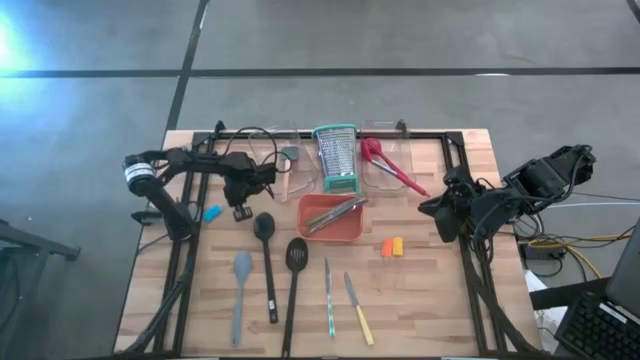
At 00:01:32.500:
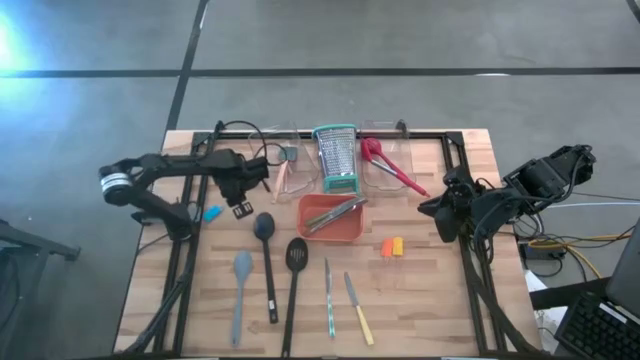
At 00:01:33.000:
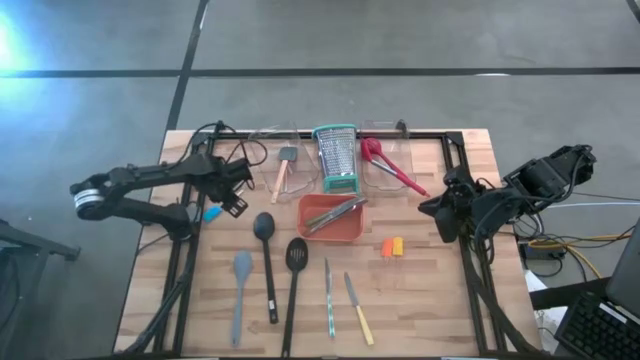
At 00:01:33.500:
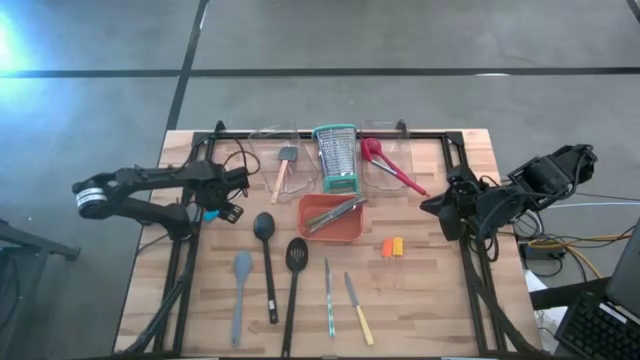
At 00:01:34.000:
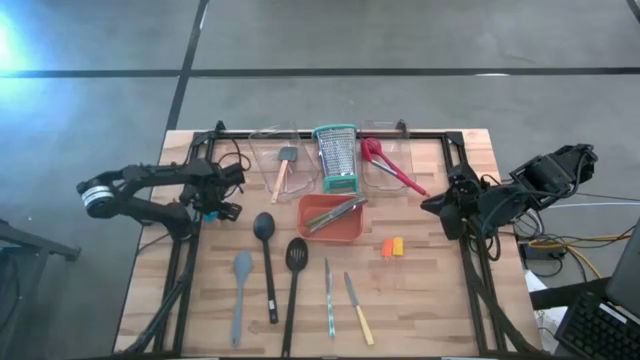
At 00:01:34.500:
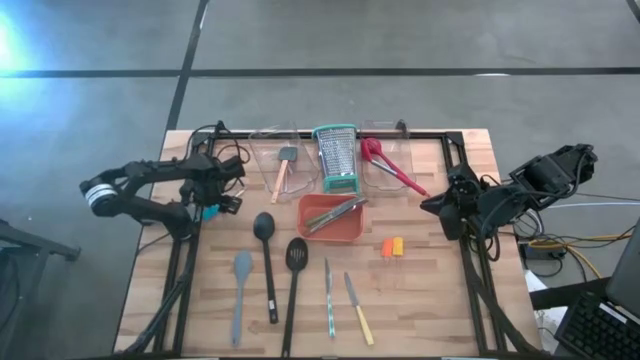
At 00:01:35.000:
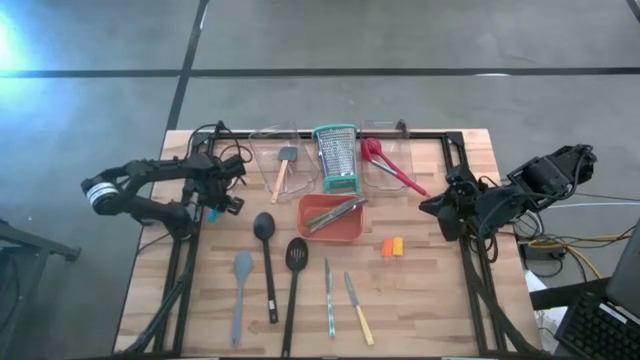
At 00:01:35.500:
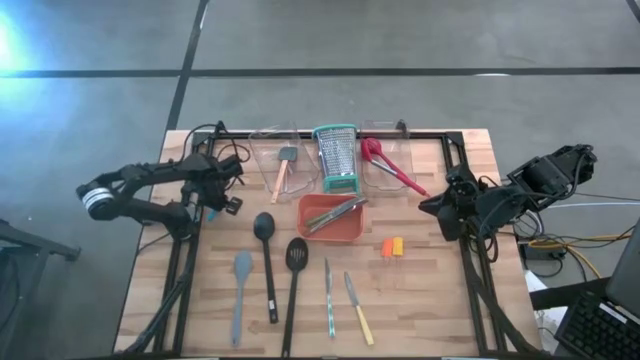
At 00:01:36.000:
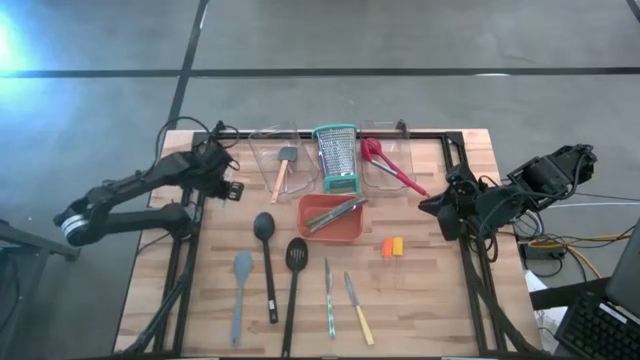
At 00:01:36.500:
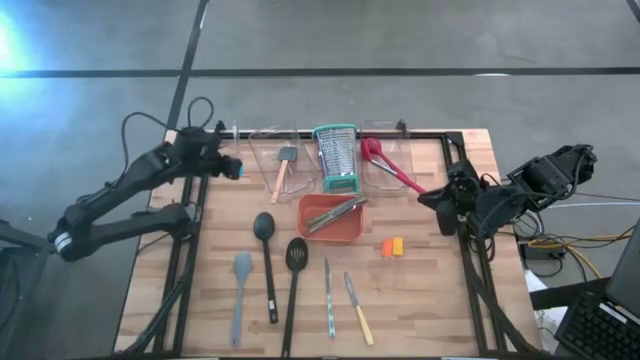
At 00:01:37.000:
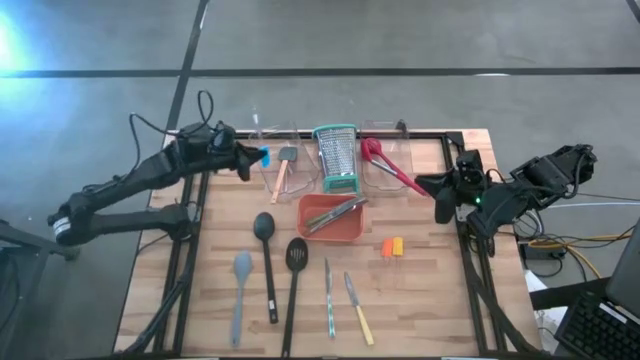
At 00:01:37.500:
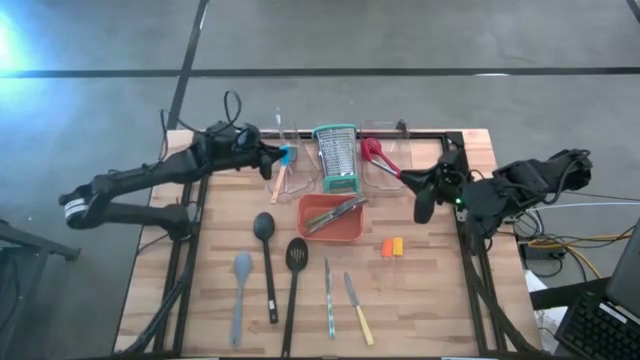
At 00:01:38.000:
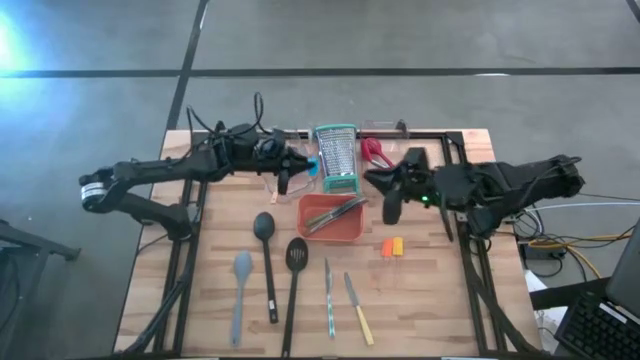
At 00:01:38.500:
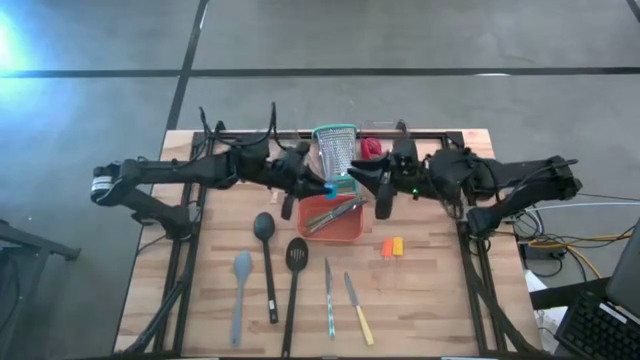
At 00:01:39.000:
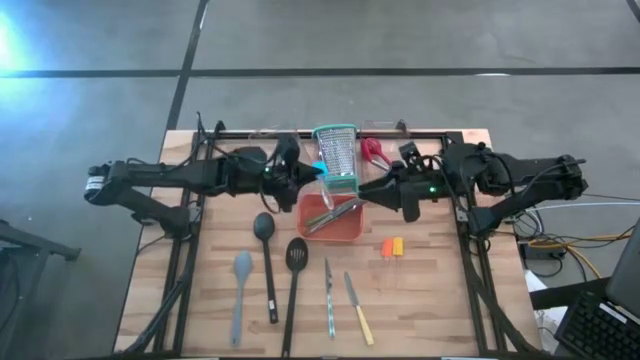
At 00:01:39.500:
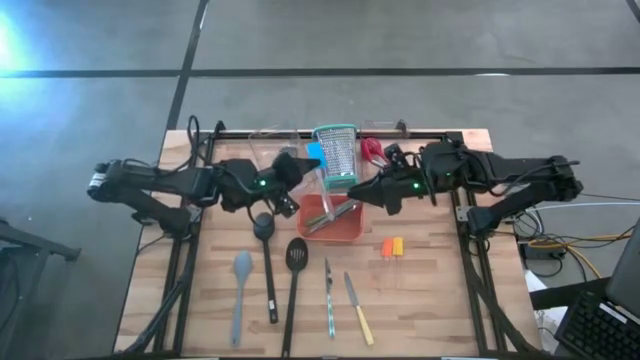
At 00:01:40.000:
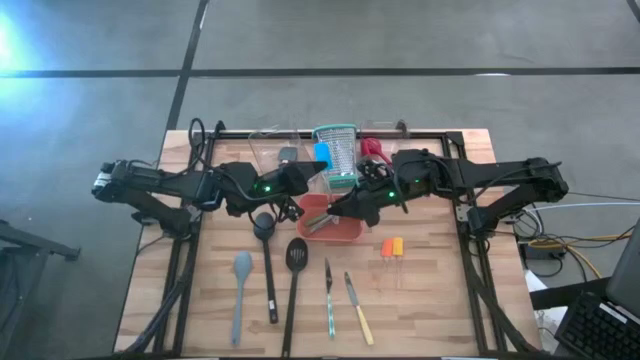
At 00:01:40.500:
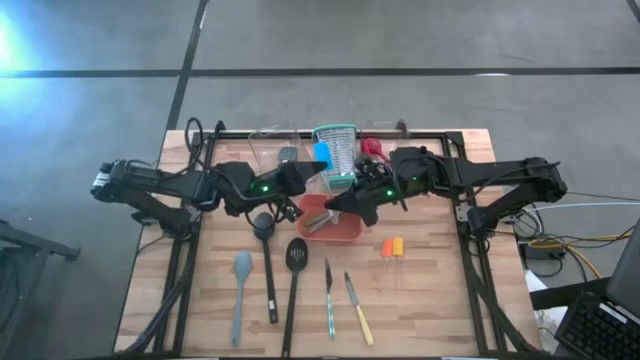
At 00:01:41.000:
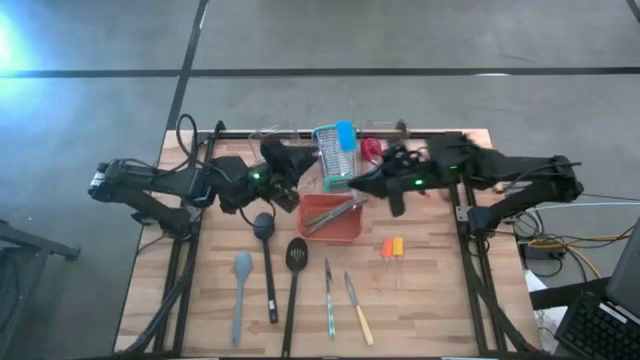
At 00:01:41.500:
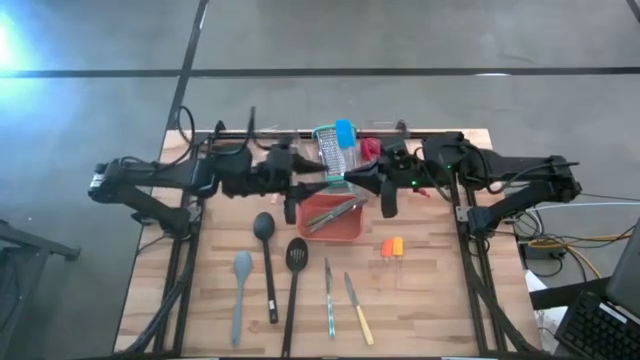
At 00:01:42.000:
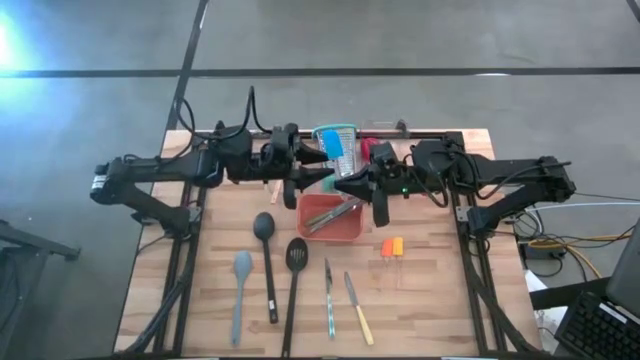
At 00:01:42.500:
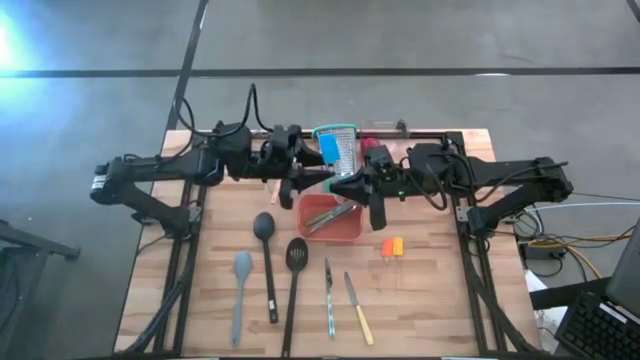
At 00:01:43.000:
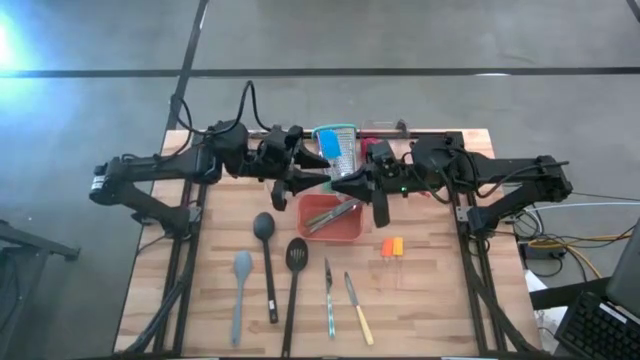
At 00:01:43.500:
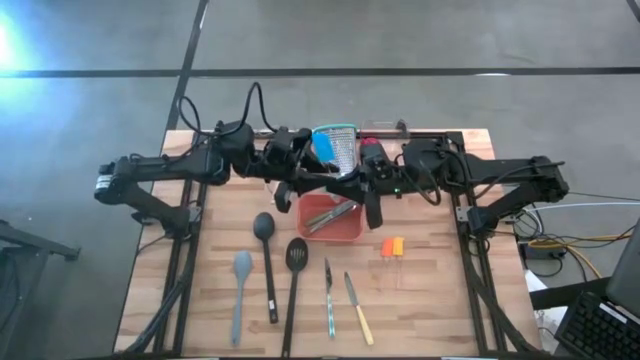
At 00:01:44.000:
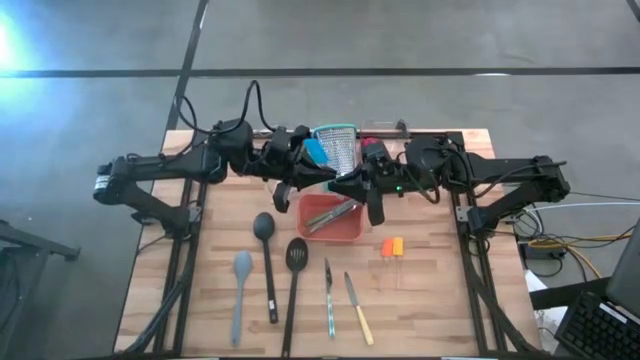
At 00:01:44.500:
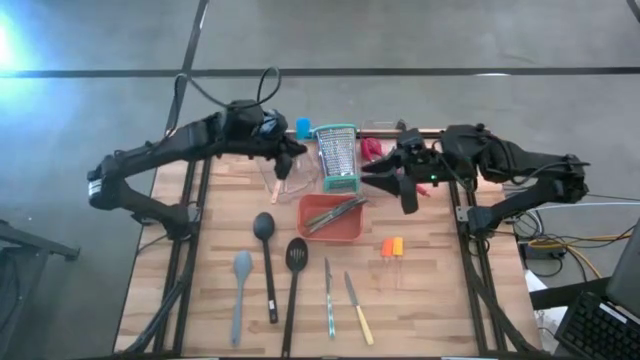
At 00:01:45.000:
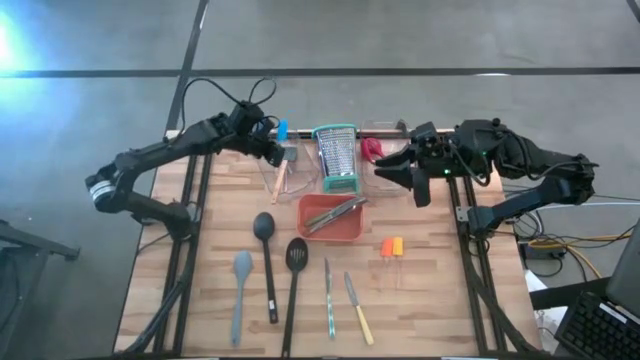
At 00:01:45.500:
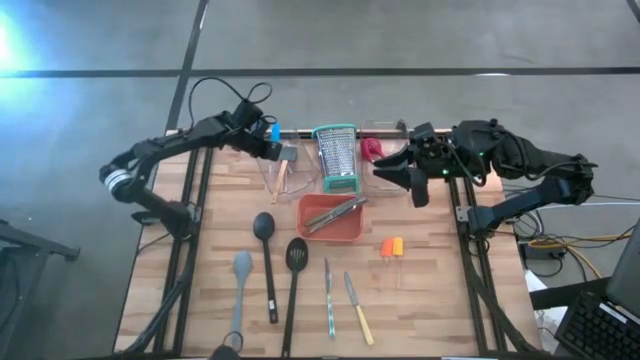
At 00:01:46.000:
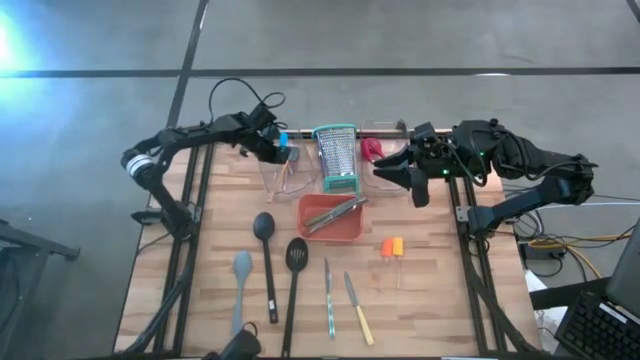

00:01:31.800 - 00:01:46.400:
Task: Pick & Place Kitchen Items
Put the blue spatula into the left transparent bin

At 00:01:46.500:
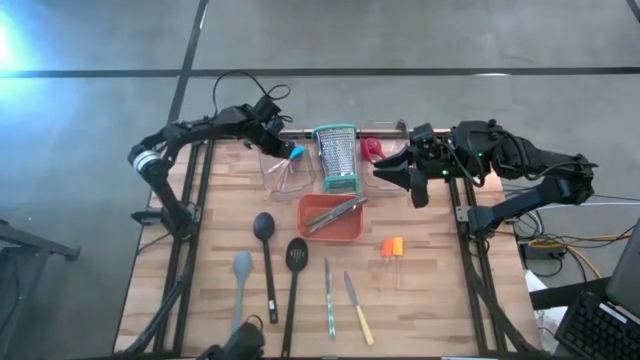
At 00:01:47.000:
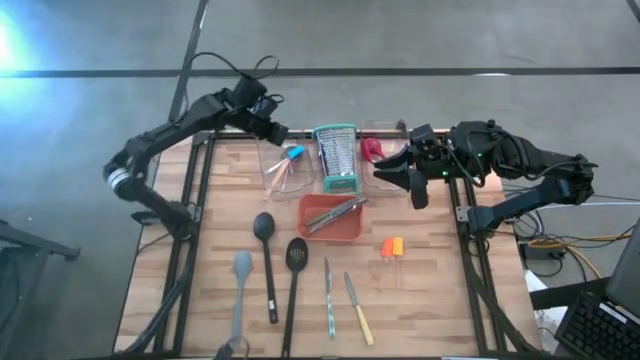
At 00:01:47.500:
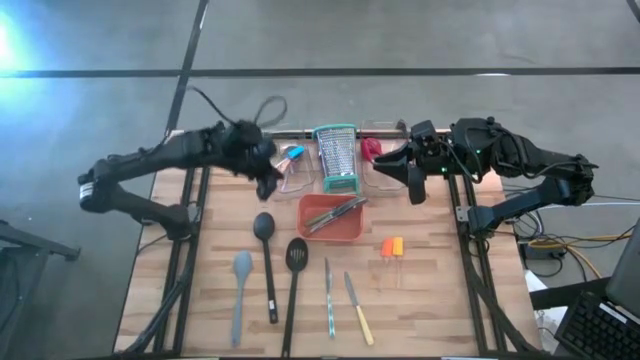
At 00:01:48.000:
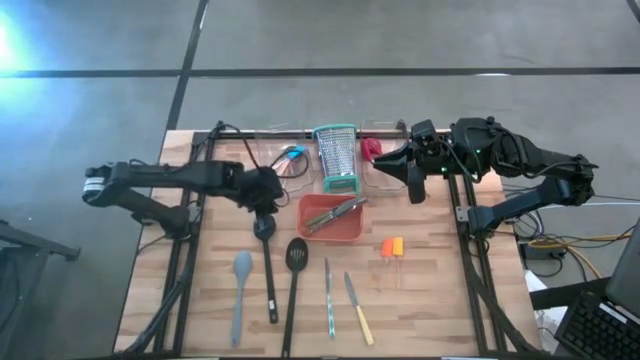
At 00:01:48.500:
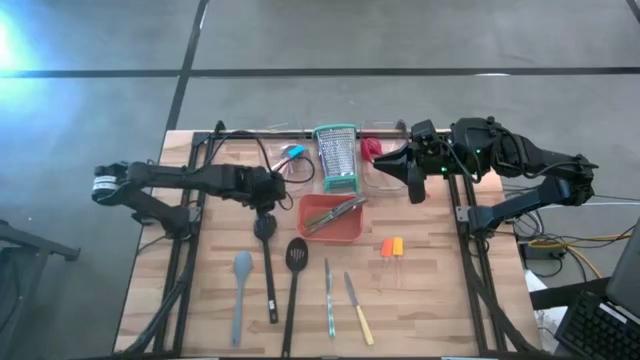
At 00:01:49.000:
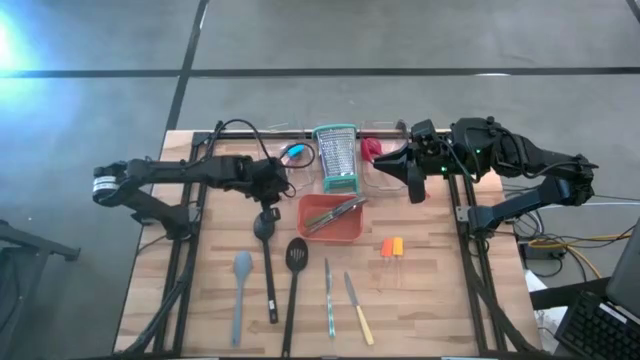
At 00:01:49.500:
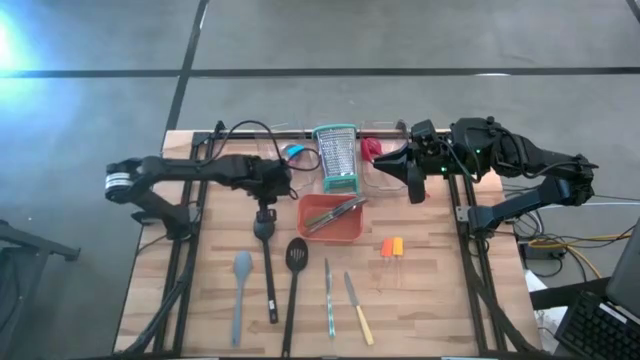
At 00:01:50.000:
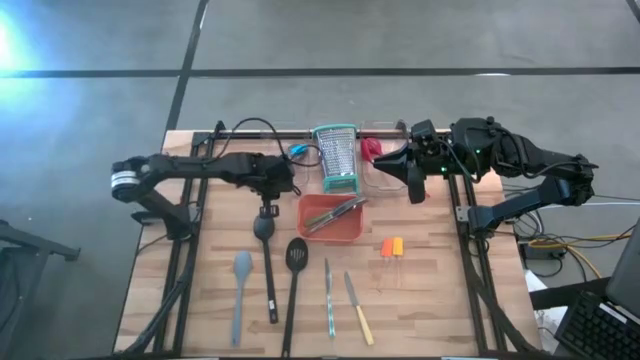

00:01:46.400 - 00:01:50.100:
Adjust the left transparent bin

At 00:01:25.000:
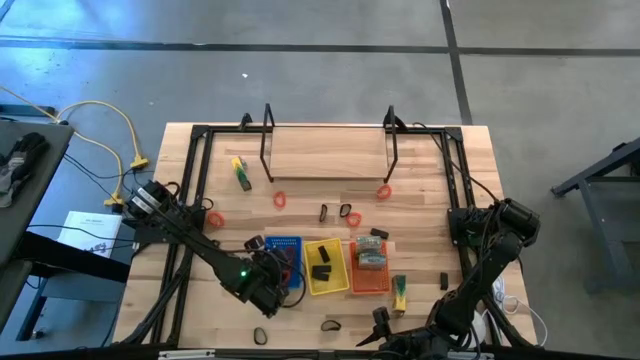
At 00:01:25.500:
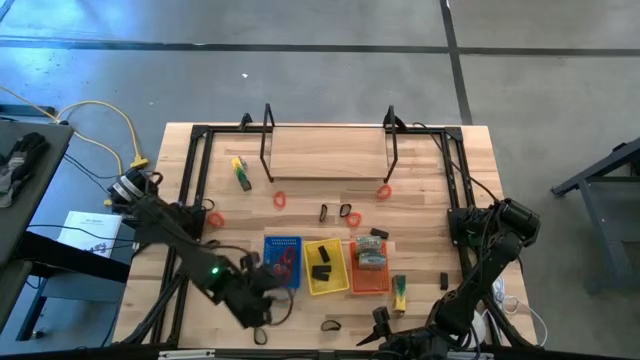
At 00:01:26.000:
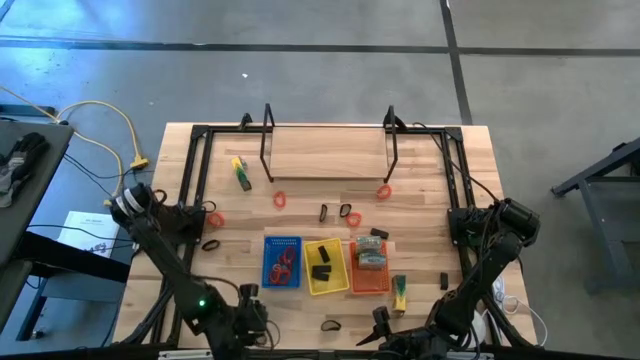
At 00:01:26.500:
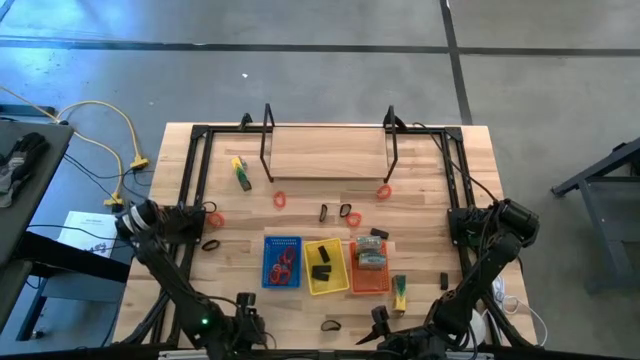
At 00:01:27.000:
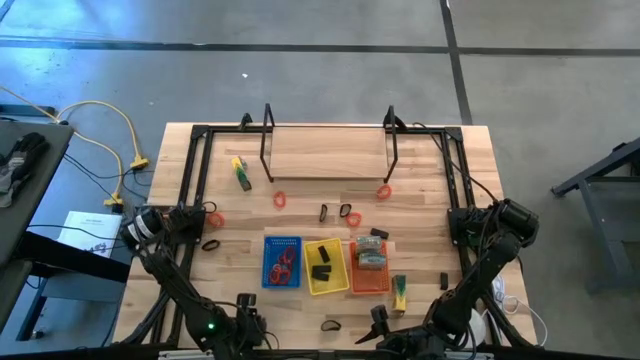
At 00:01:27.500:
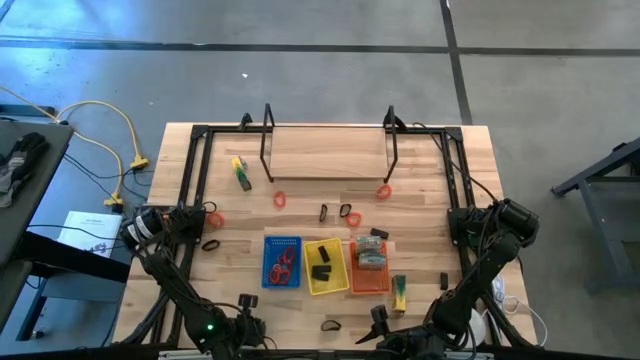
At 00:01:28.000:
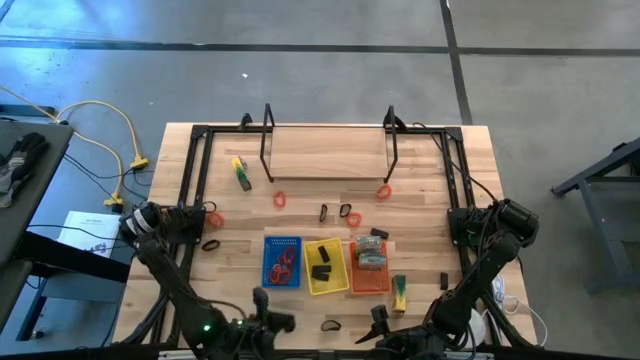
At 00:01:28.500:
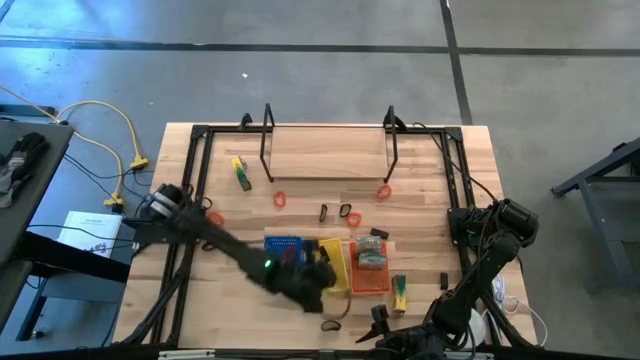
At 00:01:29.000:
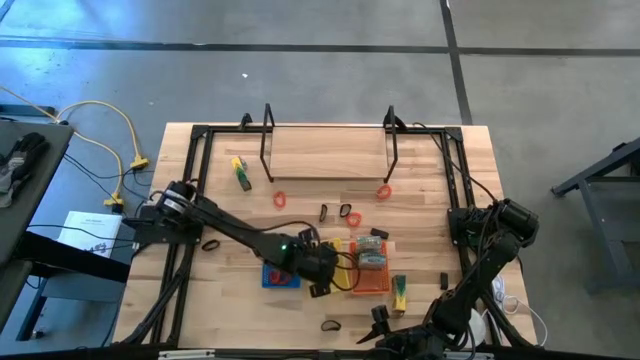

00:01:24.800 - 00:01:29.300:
Task: Pick & Place Office Desk Supplies
Put the black rubber band into the yellow basket
